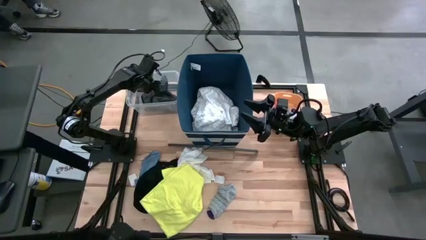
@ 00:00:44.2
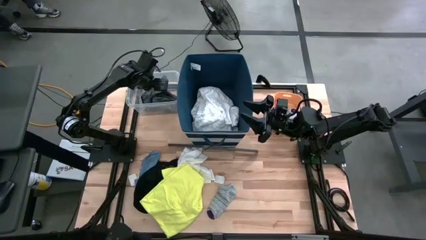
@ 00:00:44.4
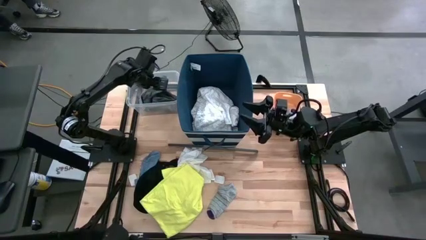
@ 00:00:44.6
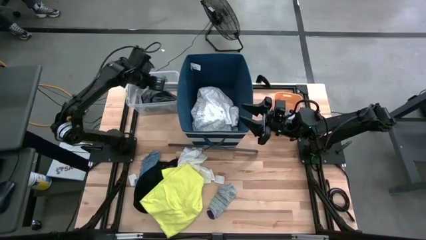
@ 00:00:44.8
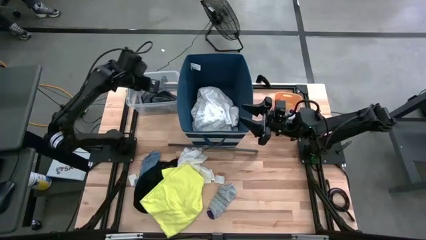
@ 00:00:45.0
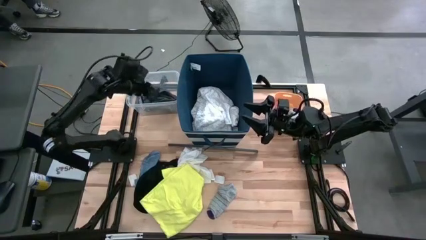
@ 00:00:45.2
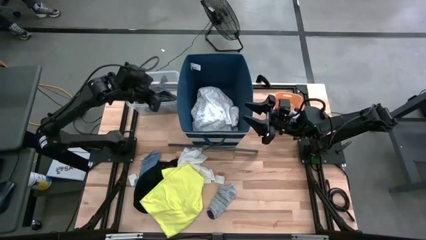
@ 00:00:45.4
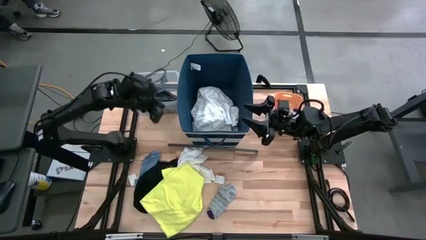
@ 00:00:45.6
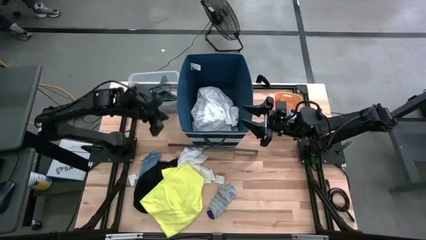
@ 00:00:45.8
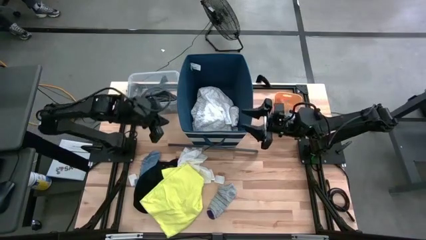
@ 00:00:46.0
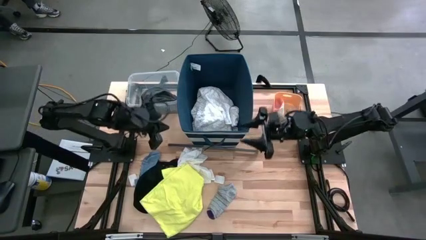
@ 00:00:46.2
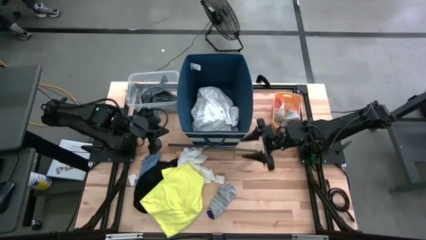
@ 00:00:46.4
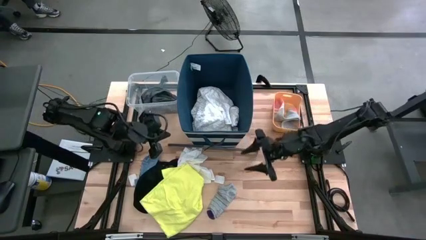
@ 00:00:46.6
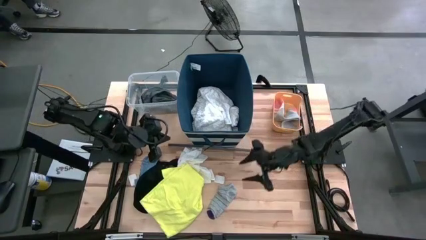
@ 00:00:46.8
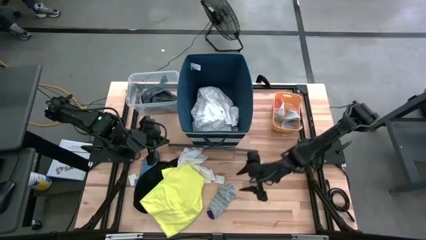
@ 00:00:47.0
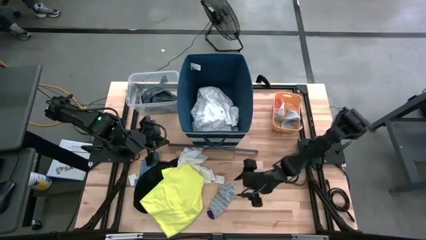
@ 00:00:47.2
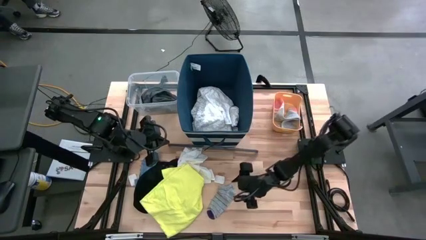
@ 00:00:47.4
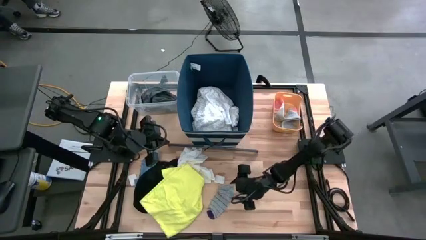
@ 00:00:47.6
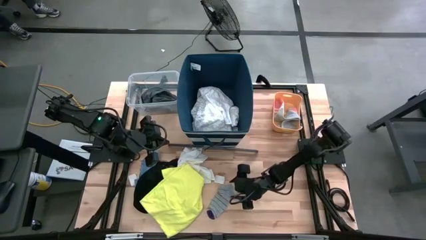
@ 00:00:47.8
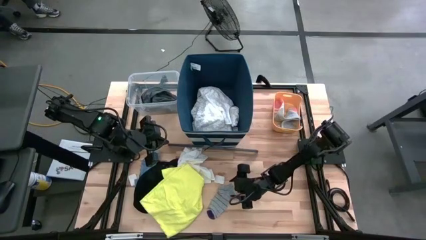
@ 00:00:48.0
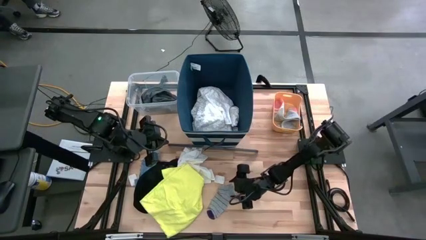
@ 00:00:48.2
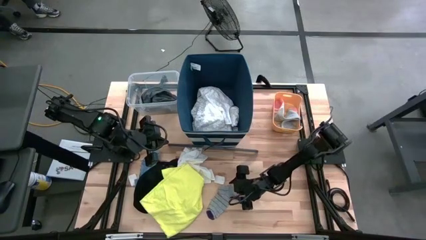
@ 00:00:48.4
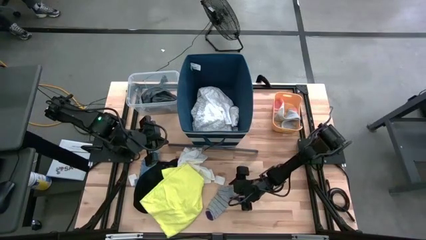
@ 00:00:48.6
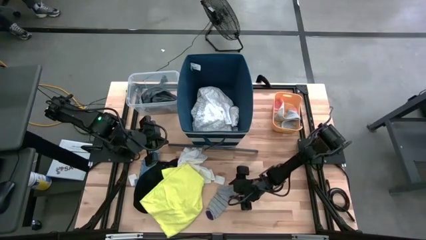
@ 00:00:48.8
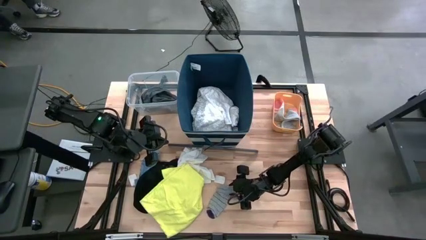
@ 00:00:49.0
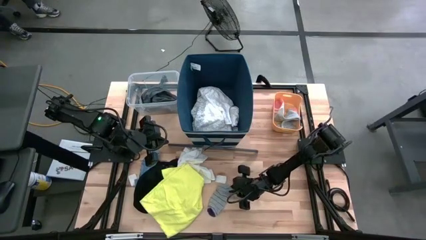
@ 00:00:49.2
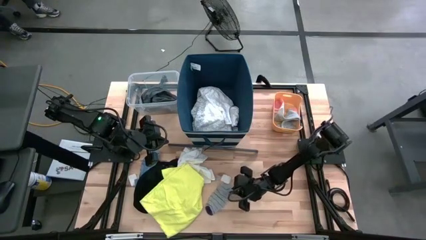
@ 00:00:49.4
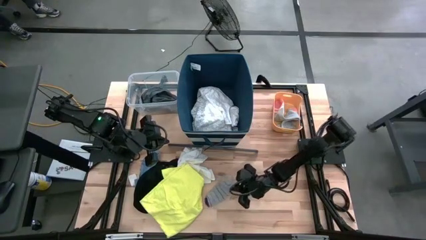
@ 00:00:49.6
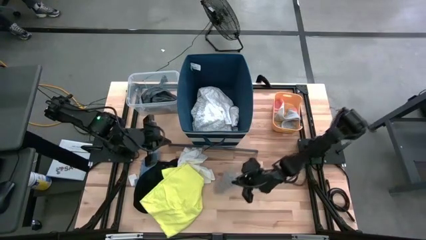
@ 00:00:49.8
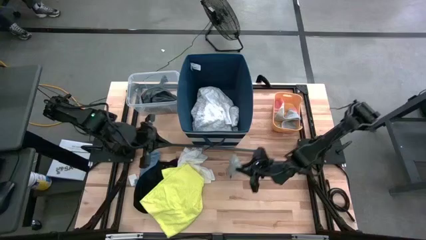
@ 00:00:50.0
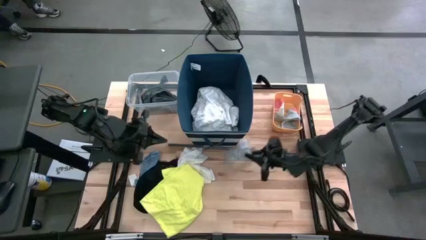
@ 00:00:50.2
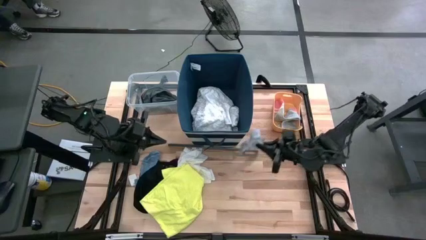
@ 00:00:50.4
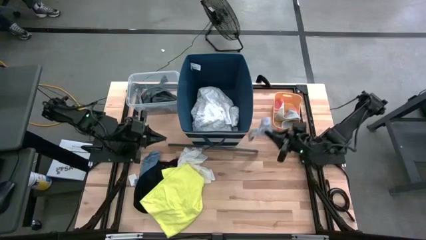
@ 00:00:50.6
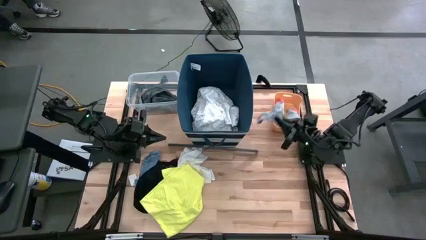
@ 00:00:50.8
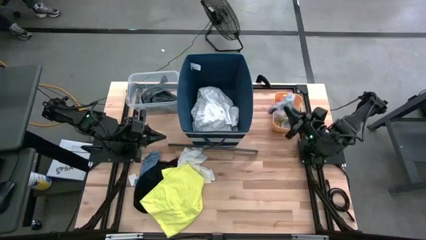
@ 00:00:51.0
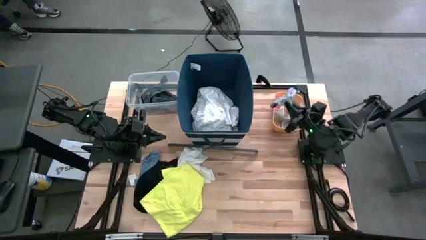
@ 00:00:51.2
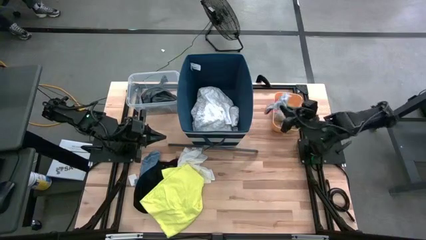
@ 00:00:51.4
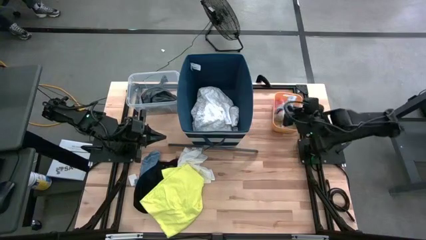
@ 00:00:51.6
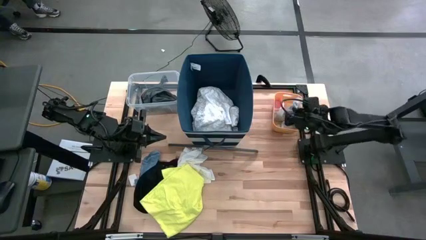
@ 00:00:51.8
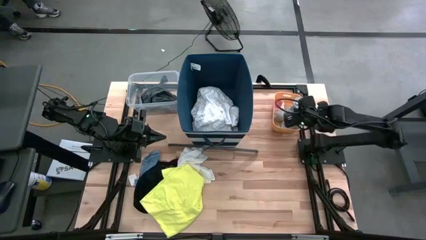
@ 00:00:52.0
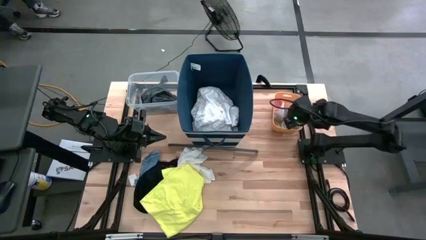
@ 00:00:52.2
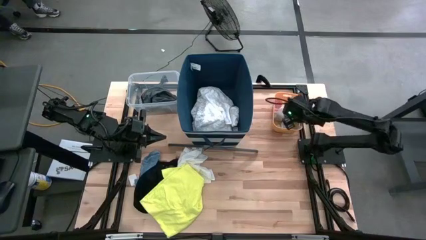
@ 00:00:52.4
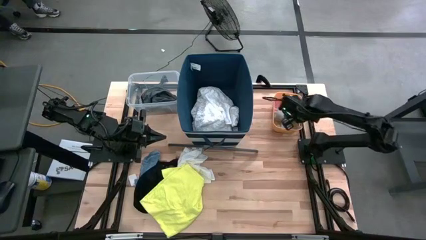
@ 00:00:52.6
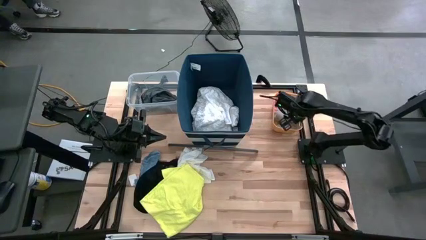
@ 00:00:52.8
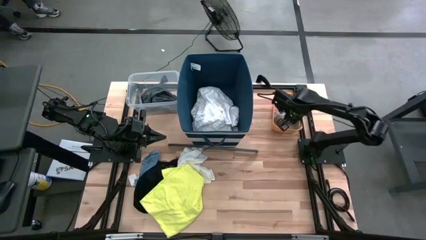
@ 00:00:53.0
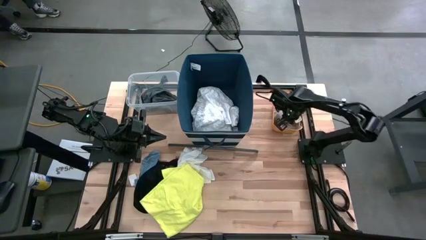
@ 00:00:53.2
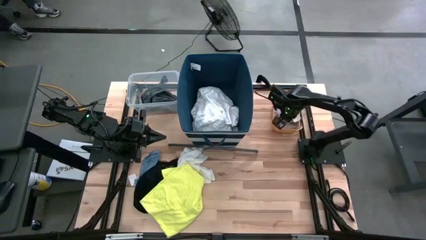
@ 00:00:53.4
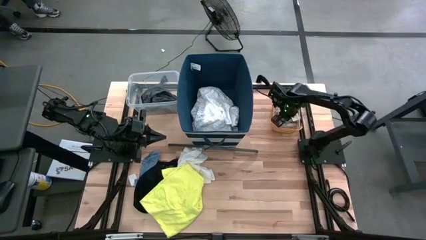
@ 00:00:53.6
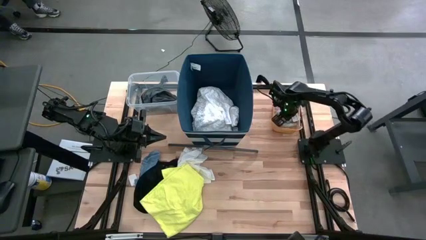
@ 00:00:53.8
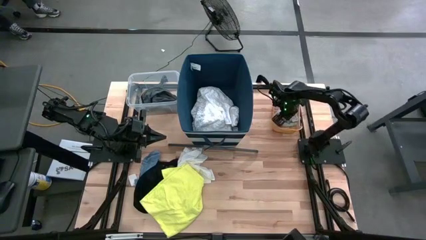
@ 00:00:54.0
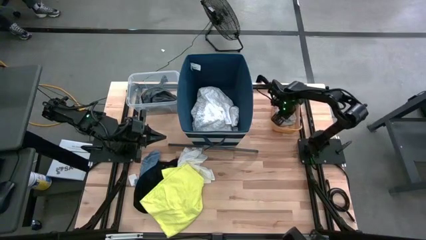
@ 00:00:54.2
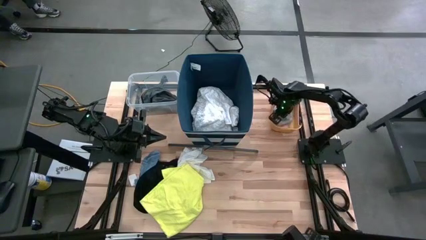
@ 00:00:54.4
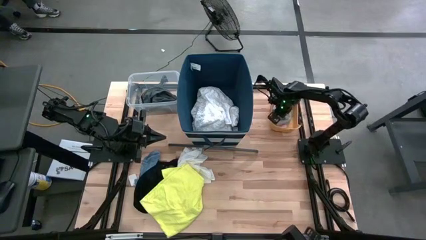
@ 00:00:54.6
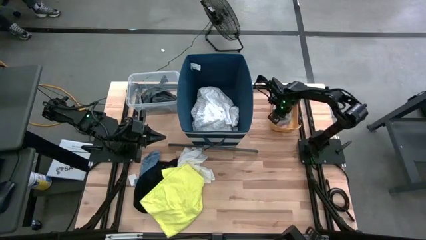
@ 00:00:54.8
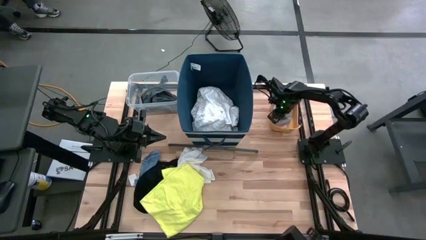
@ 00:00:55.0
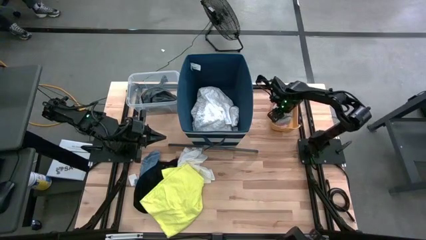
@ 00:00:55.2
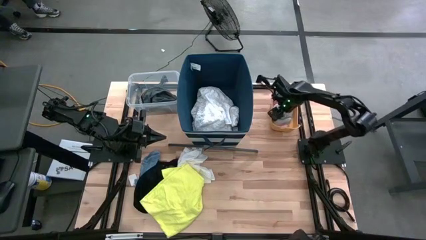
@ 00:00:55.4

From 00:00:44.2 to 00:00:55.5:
Task: Pick & Place Cloths
Put the grey sock into the orange bin

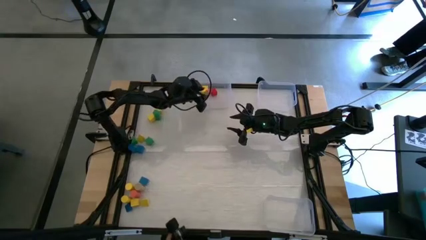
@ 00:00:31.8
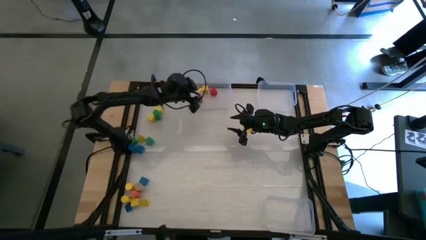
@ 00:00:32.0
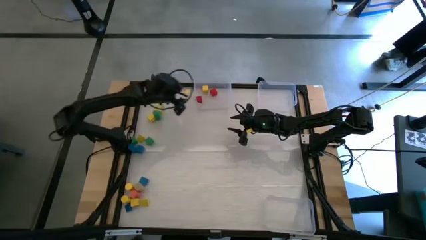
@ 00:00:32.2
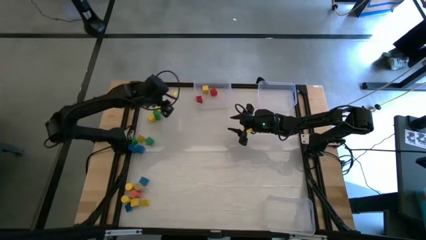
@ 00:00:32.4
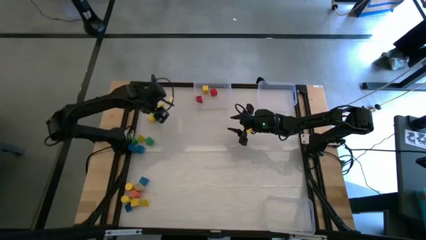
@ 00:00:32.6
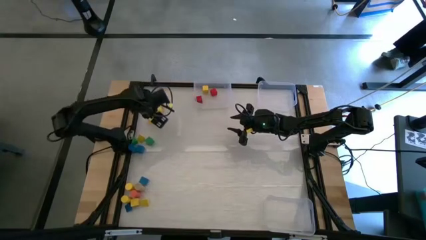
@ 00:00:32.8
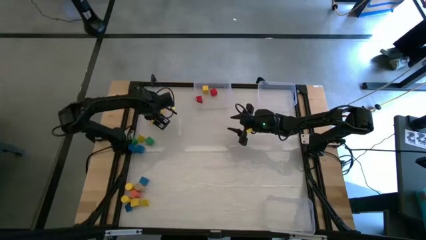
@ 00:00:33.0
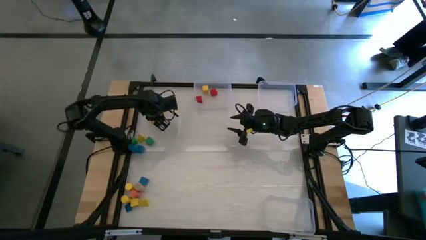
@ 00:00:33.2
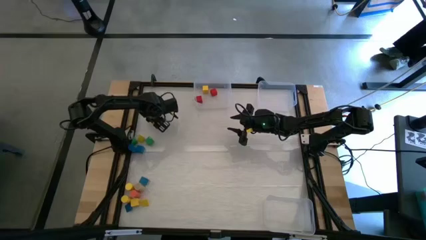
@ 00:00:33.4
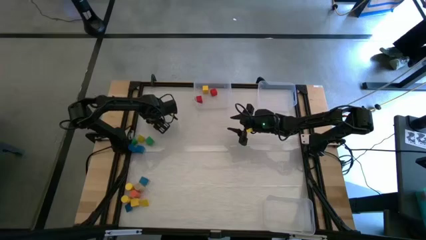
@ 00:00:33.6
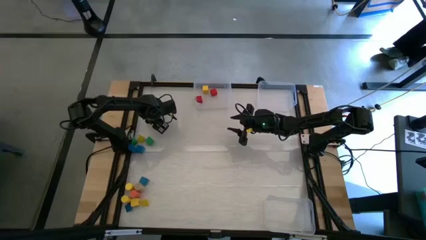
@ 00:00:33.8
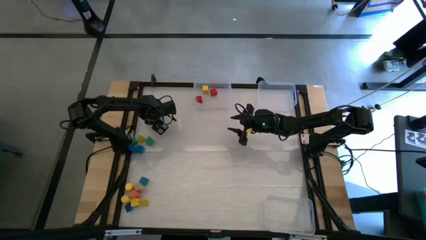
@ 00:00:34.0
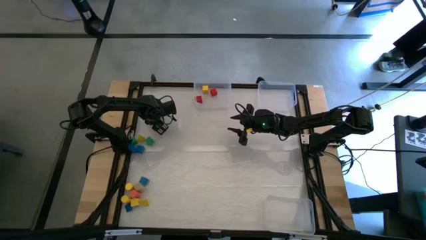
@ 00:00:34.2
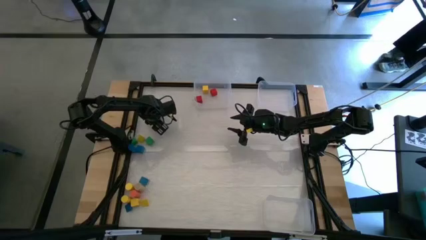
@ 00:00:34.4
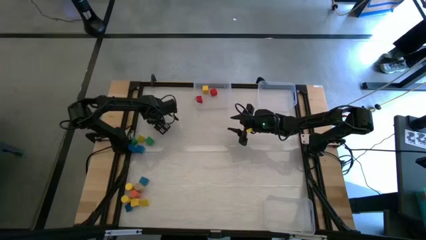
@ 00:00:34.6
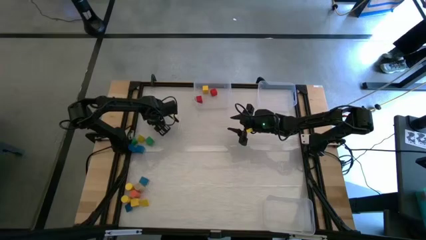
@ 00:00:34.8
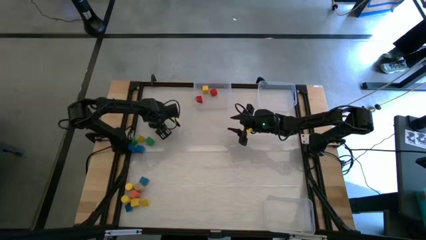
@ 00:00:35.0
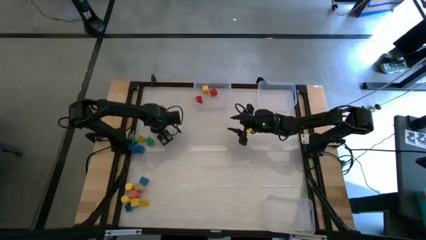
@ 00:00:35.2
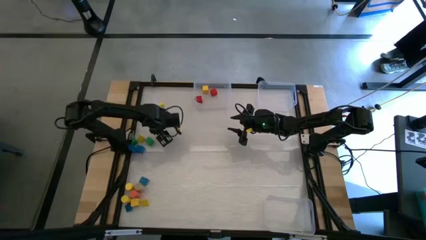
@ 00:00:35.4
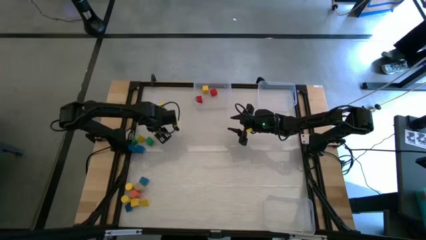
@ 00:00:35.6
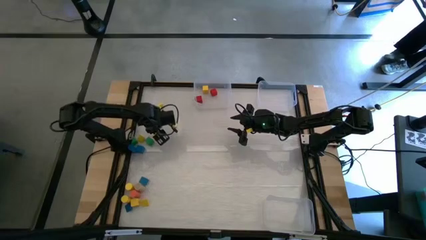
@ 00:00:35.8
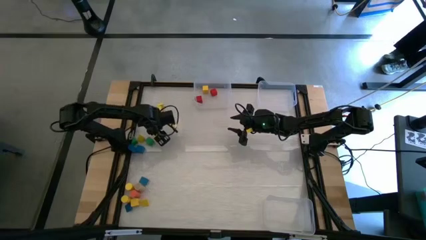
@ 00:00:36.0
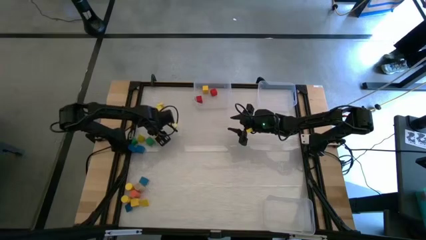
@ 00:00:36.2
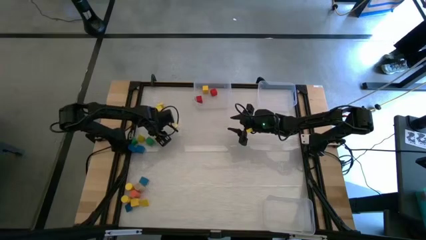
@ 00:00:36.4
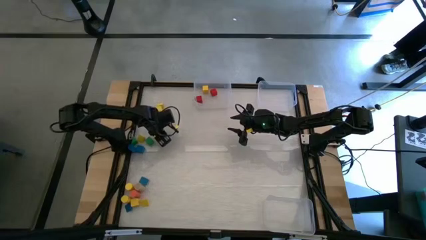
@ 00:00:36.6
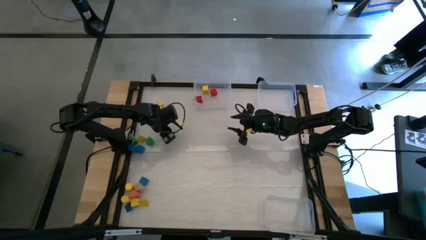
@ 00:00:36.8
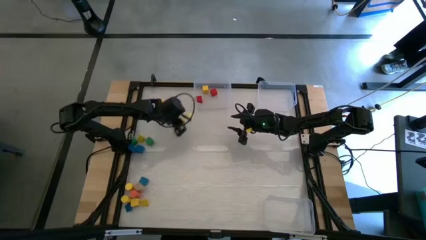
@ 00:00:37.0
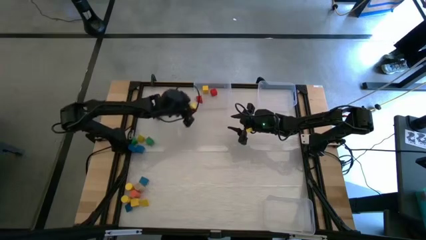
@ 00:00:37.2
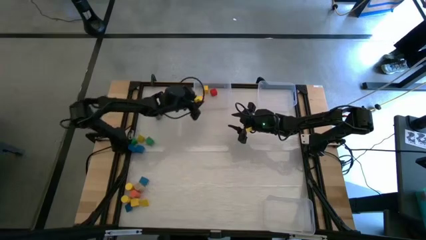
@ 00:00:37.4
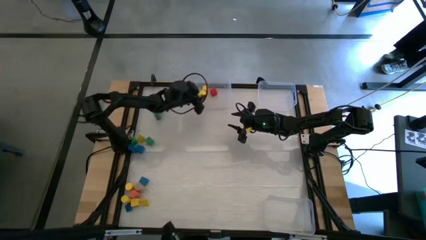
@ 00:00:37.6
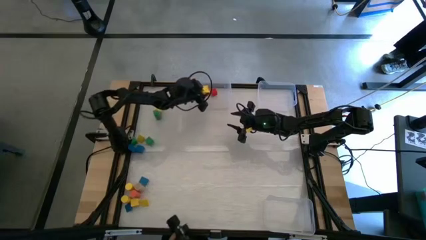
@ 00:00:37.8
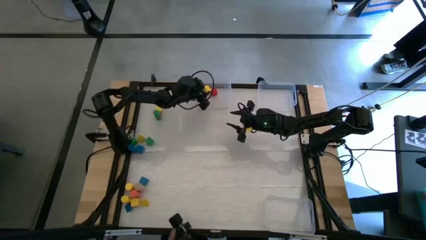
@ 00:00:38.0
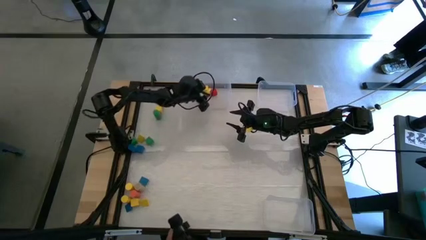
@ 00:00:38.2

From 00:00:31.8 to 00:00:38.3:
Task: Sort blocks by size
Put the square yellow block into the top left transparent bin
